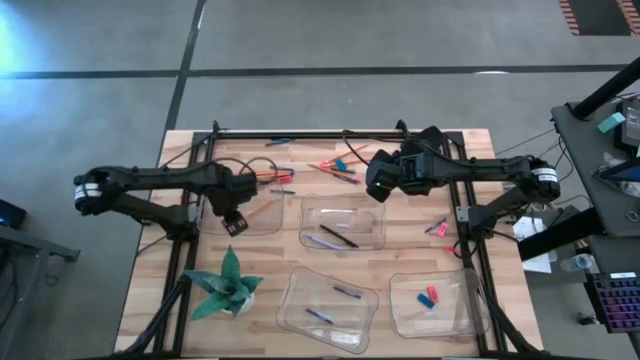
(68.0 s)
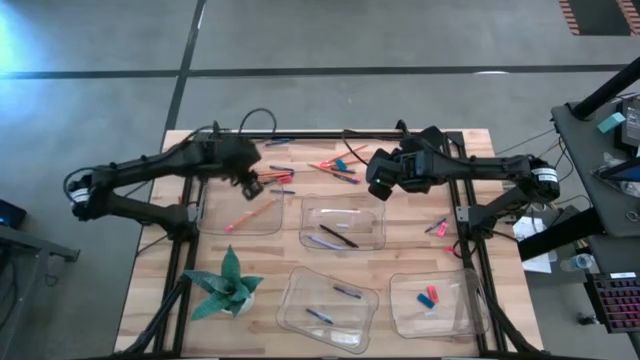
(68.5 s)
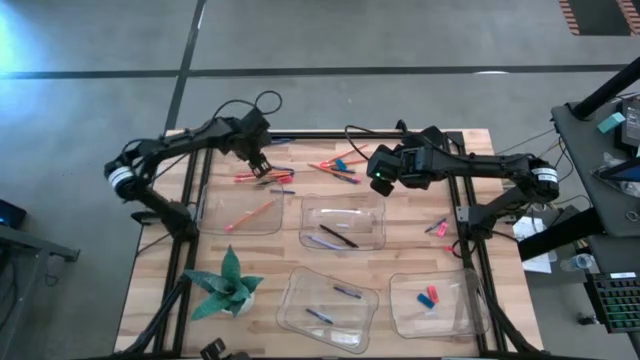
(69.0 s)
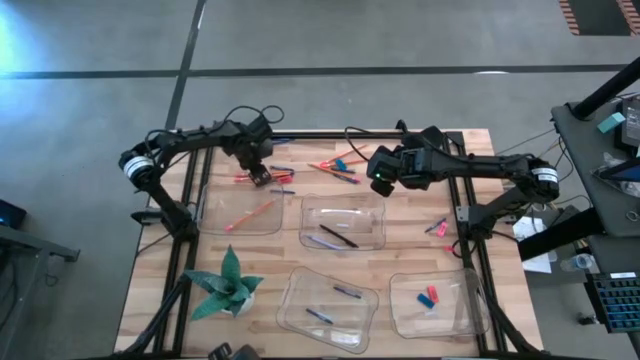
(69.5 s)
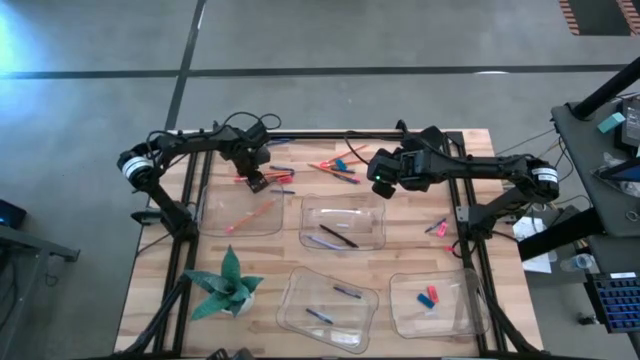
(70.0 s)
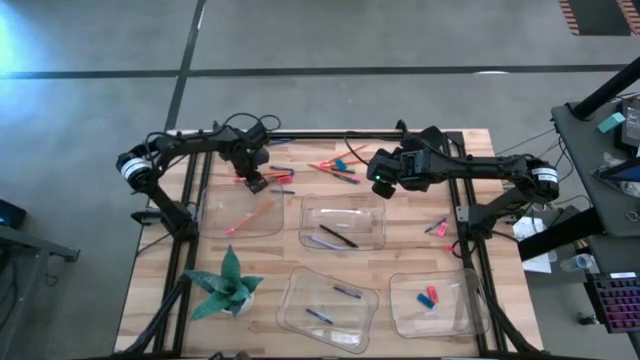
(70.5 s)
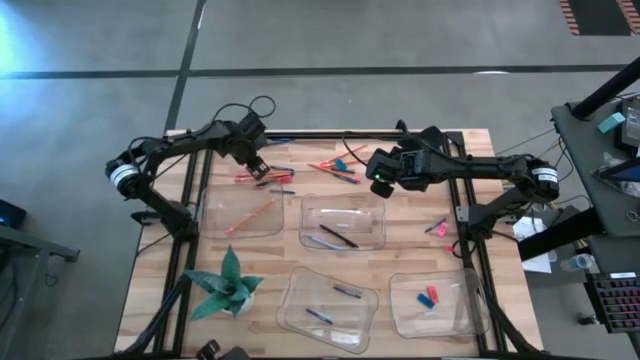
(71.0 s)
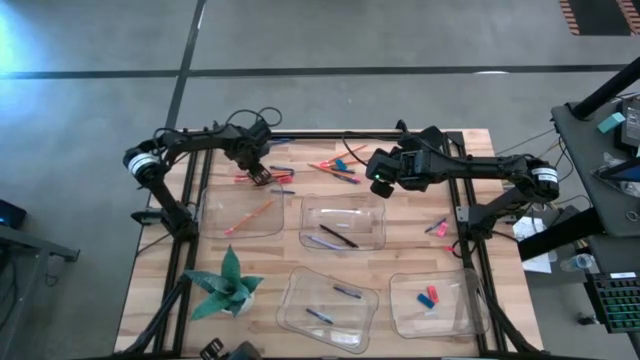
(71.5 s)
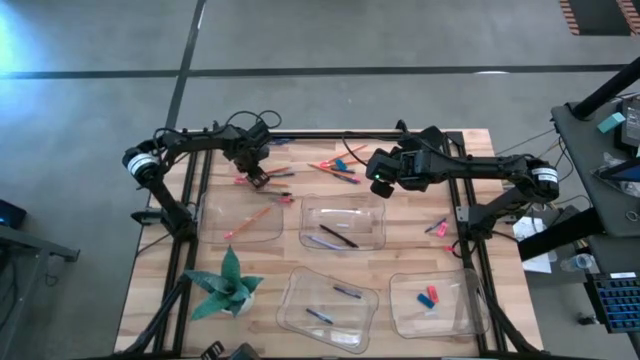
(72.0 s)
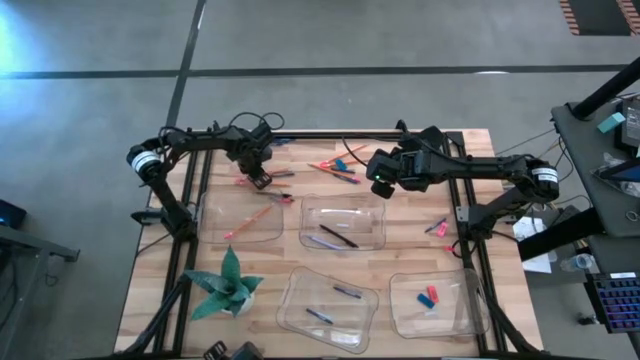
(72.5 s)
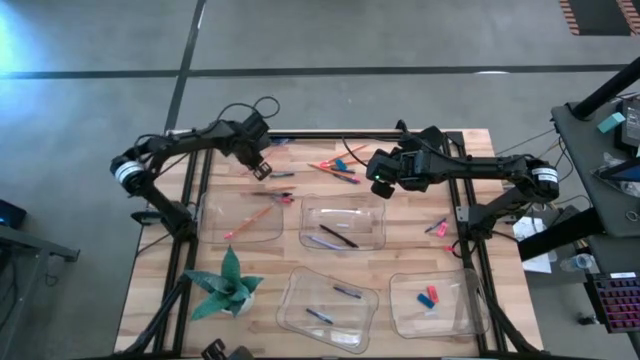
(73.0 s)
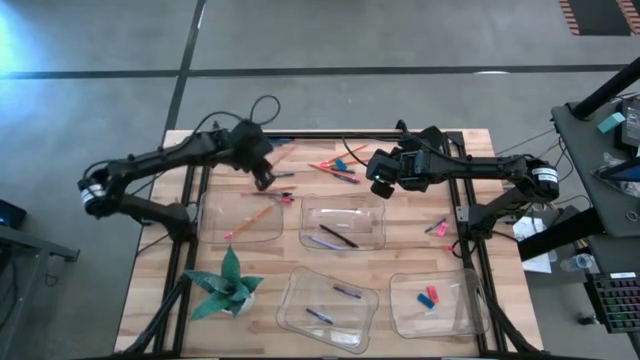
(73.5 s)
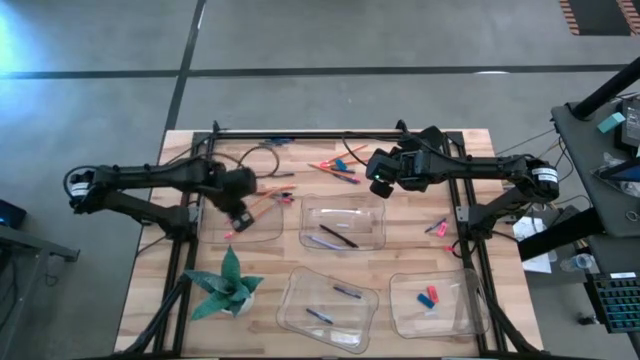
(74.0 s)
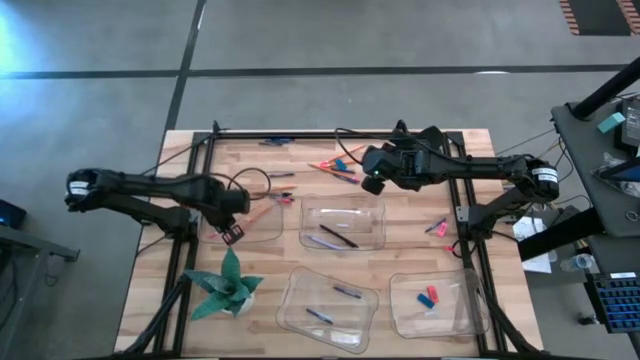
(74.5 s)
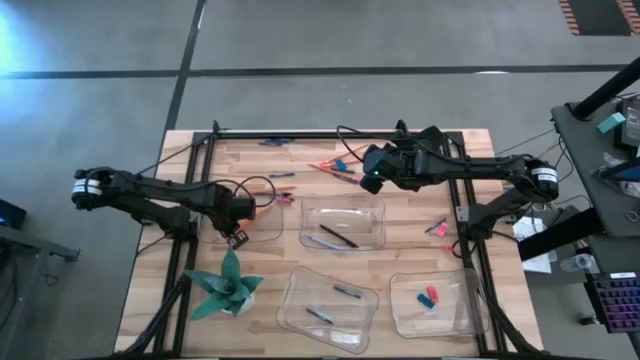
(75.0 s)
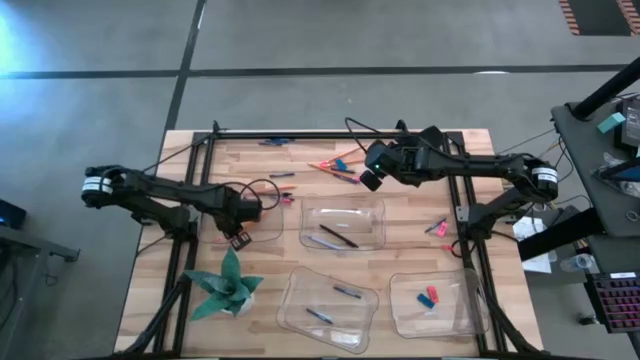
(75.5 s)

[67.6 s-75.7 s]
Task: Sort crayons/erasers/pens/pencils in bins
Put the orange pencil into the top left transparent bin

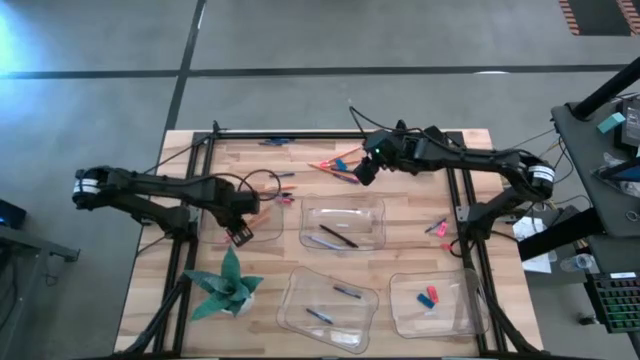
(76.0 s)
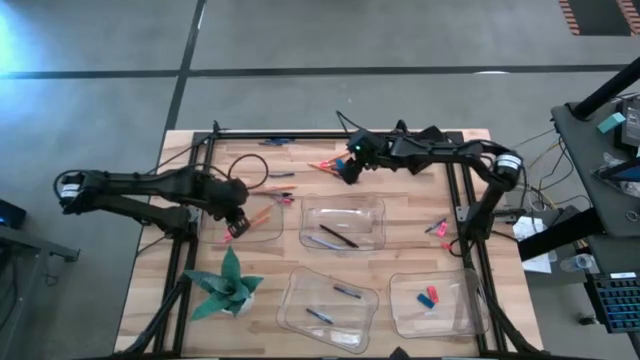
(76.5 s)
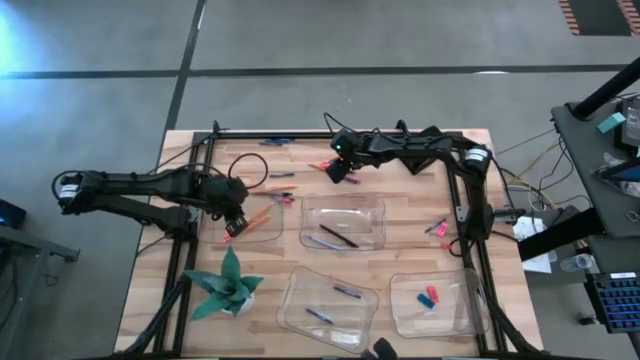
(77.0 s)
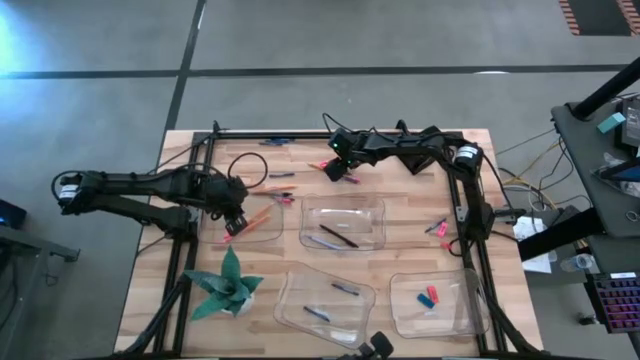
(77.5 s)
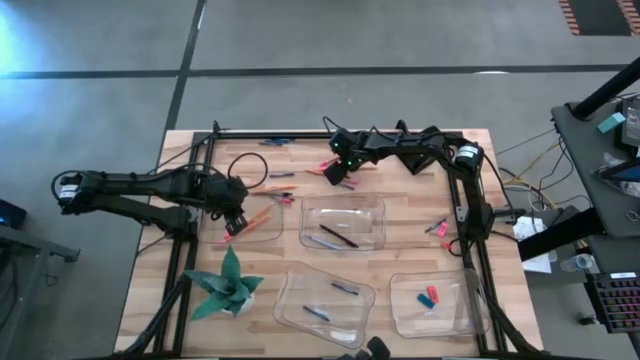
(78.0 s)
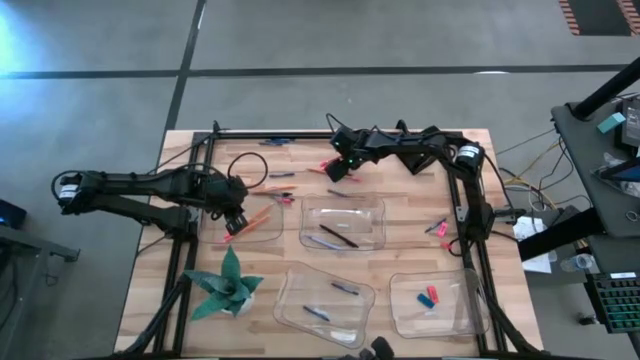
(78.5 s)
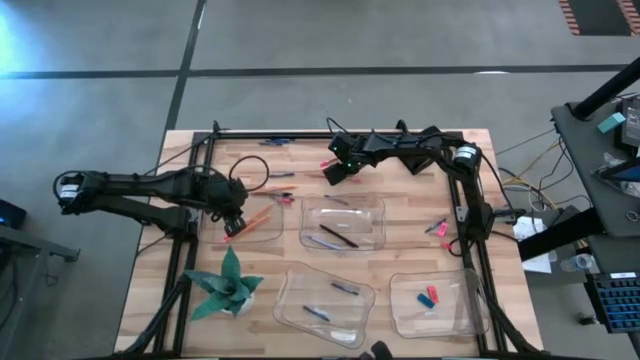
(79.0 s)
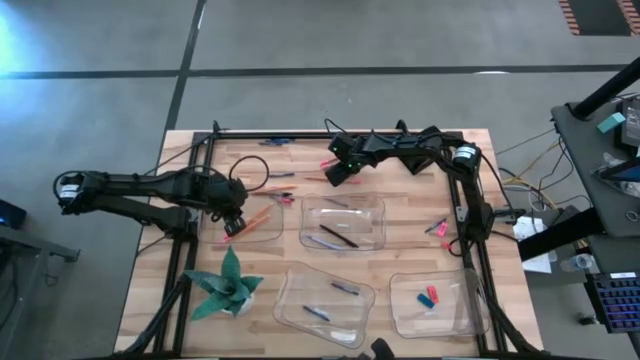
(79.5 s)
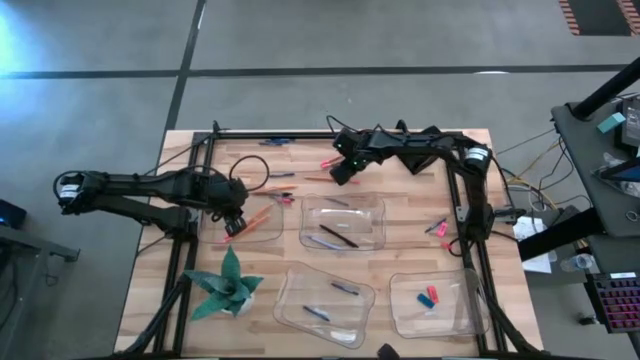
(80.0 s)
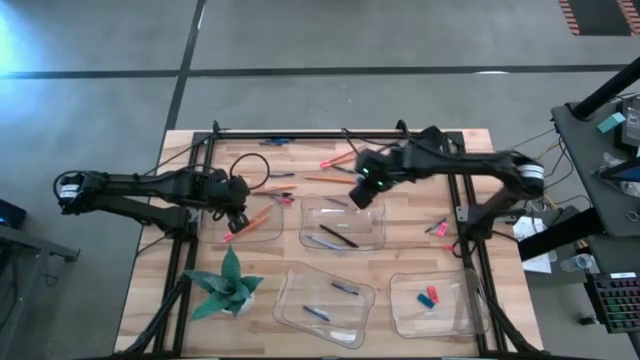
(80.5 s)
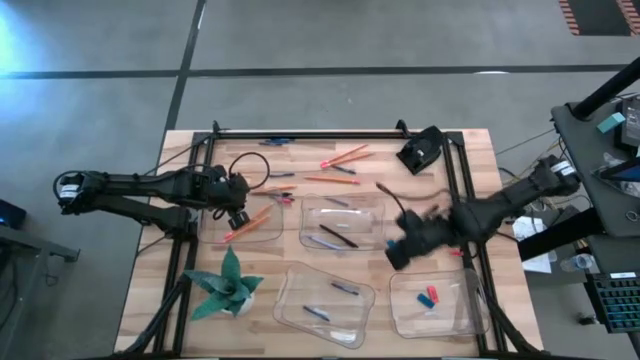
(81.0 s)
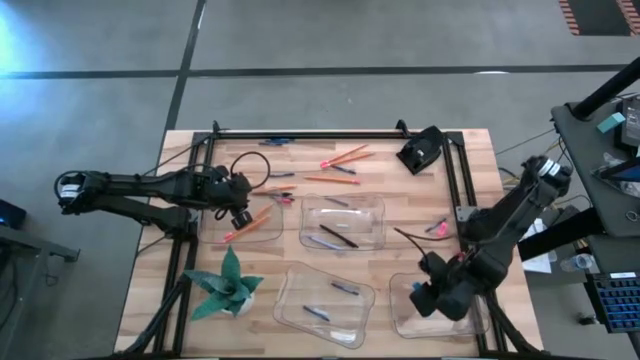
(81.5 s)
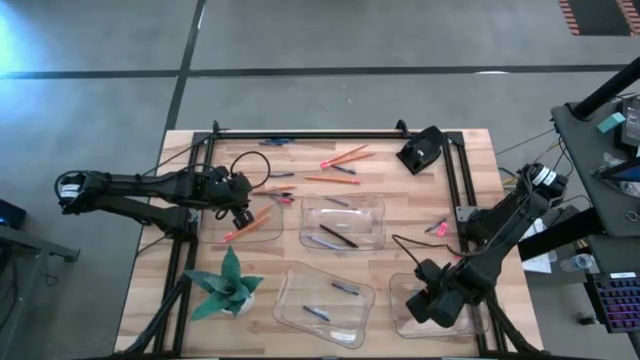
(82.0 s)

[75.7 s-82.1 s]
Put the blue eraser into the bottom right transparent bin

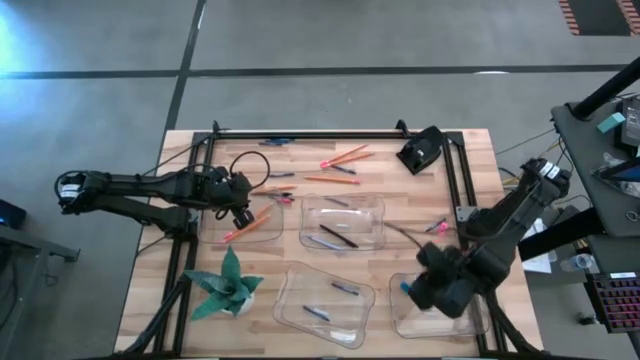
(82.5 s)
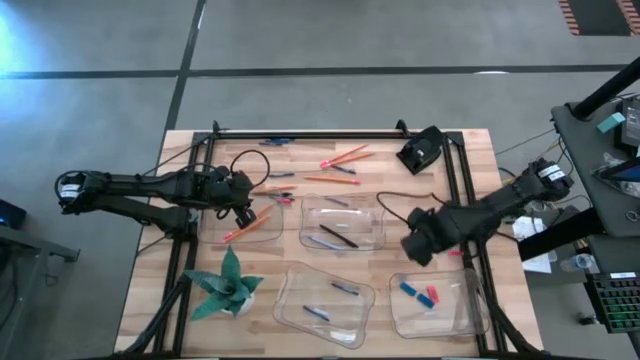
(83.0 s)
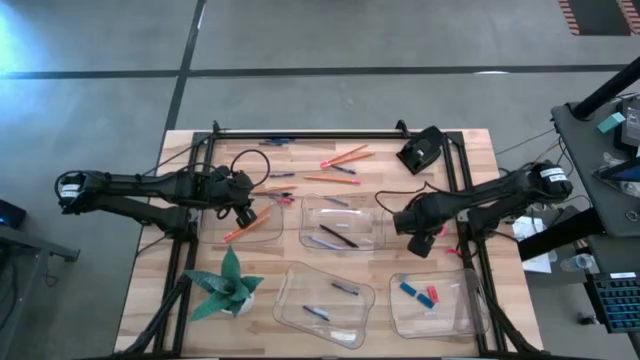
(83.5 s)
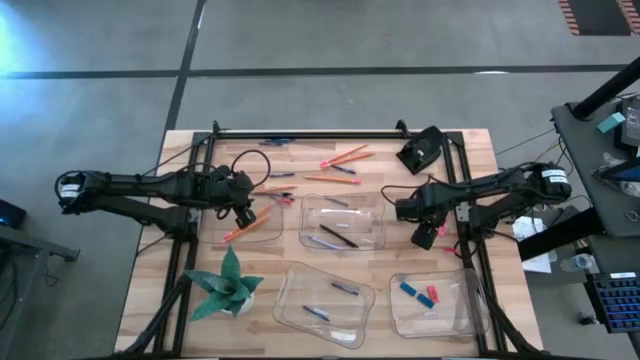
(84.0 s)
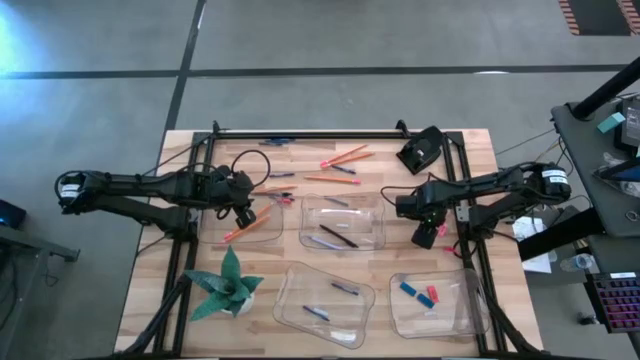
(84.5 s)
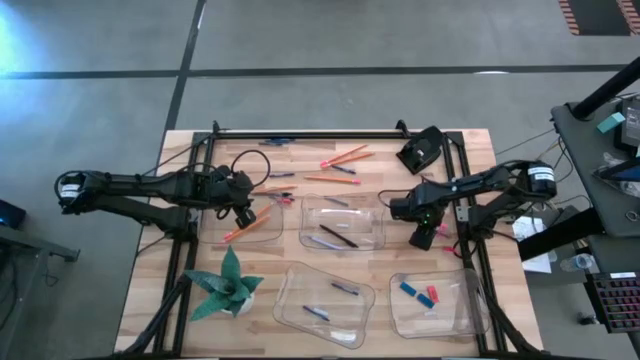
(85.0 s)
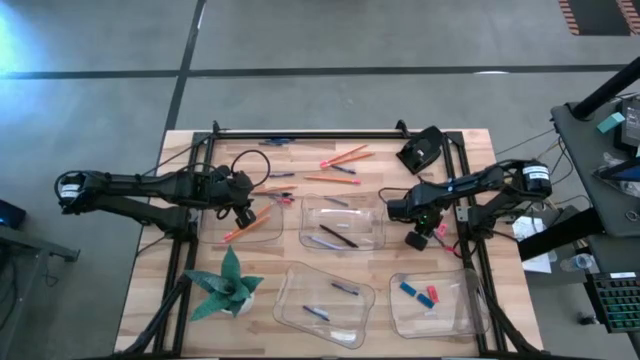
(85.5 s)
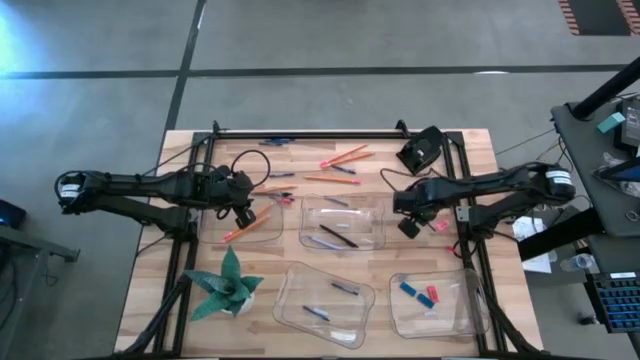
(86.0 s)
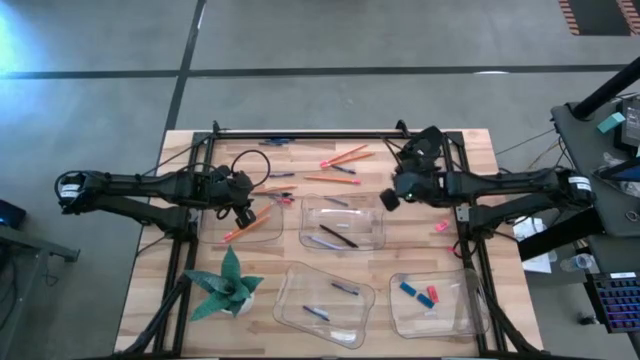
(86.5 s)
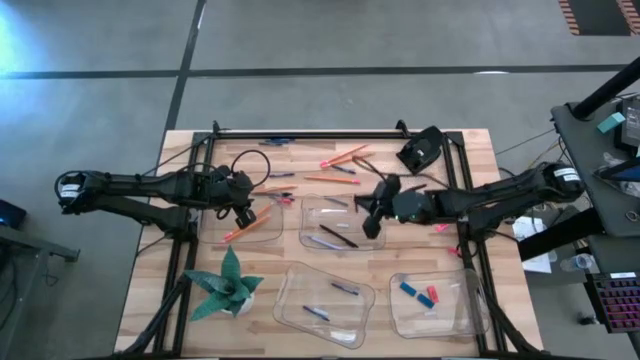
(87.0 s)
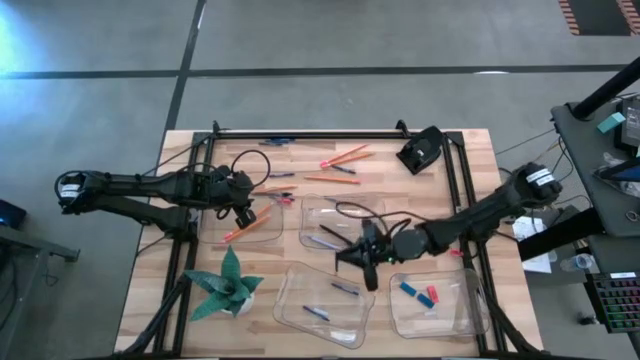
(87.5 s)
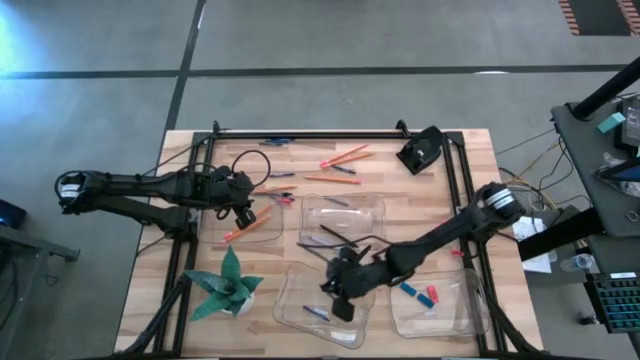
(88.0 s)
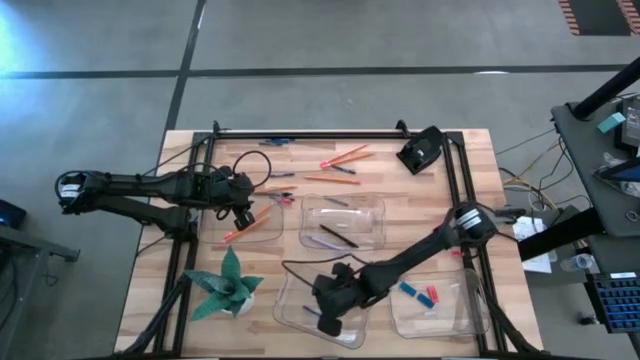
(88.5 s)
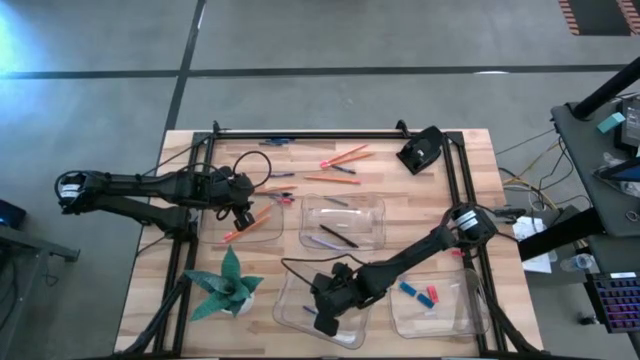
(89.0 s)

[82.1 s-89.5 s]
Put the blue crayon into the bottom left transparent bin
